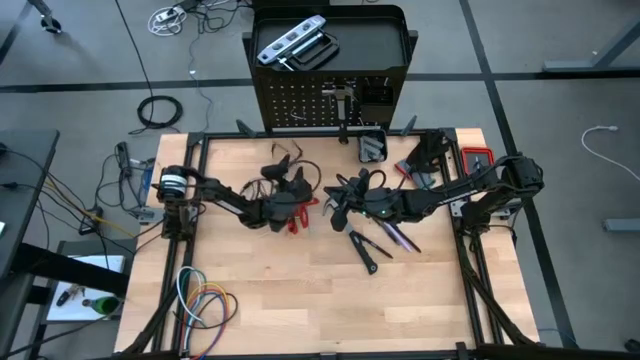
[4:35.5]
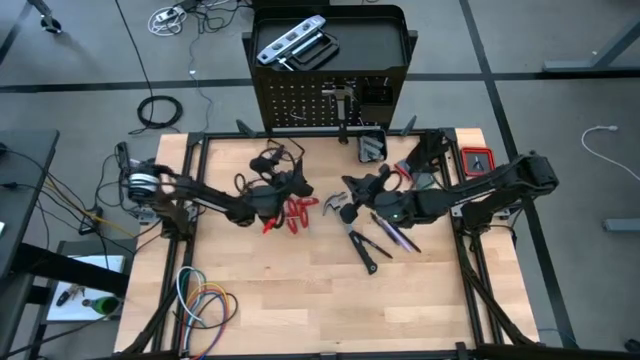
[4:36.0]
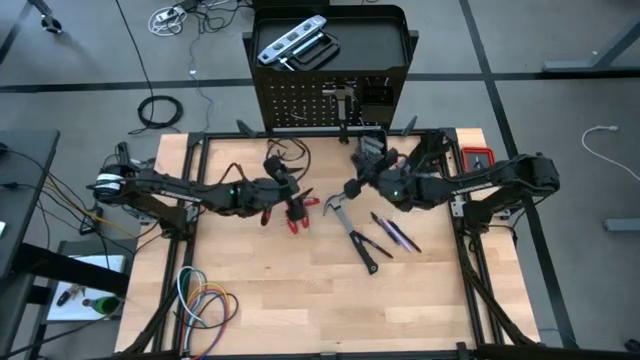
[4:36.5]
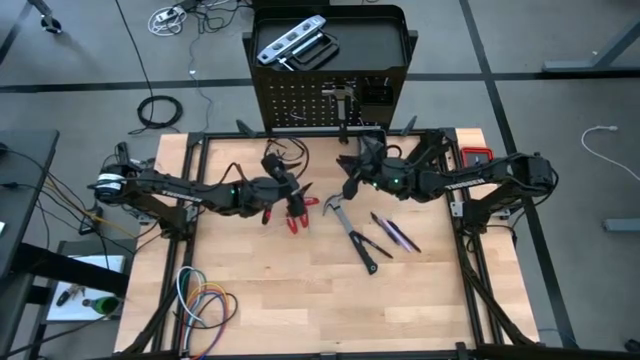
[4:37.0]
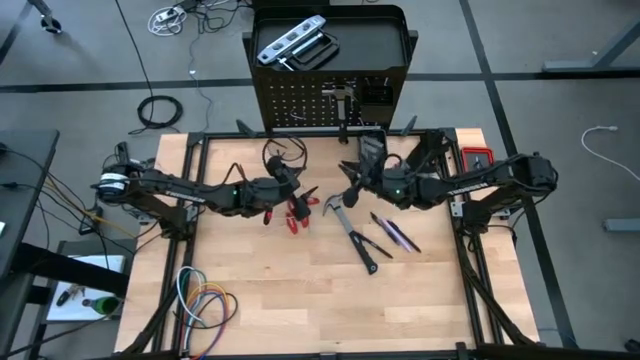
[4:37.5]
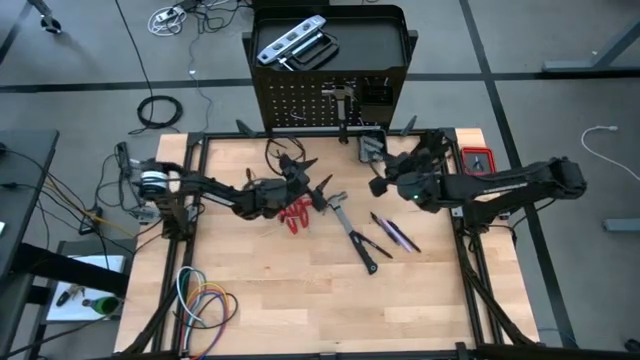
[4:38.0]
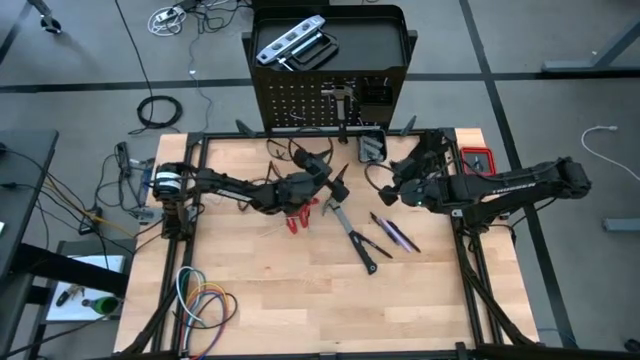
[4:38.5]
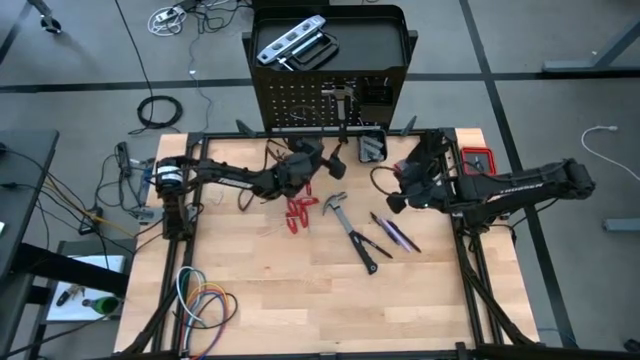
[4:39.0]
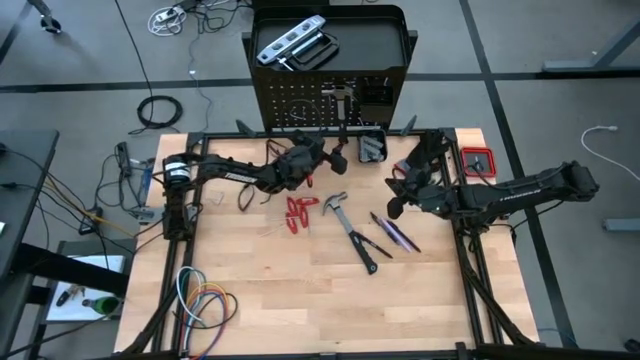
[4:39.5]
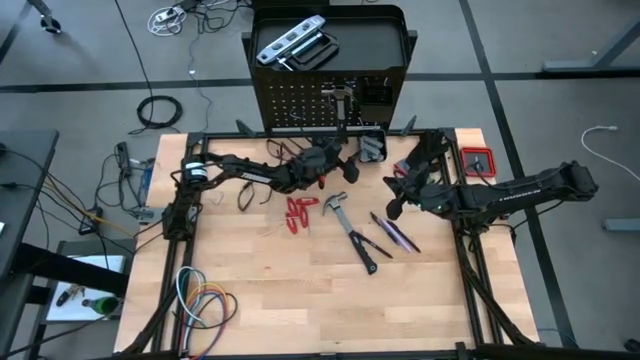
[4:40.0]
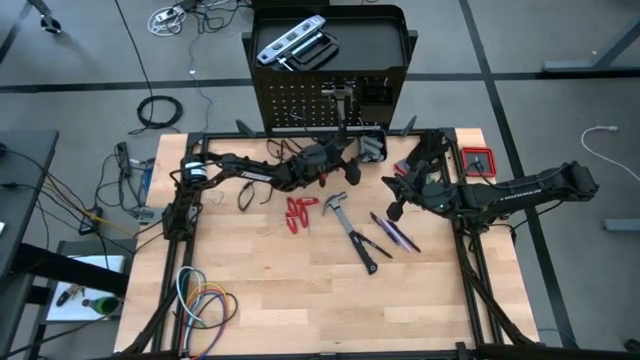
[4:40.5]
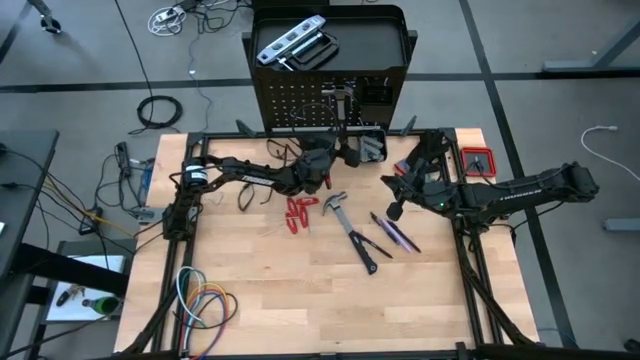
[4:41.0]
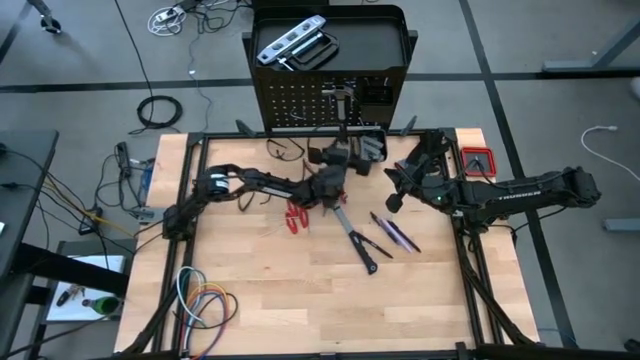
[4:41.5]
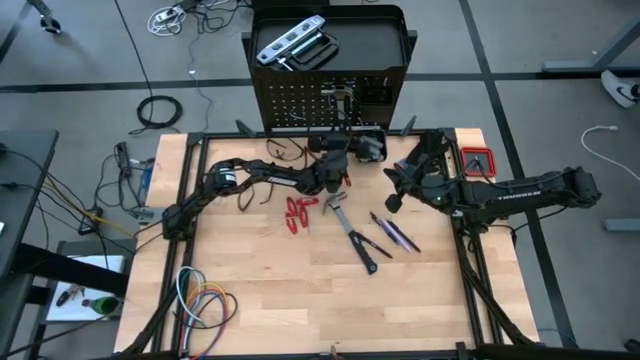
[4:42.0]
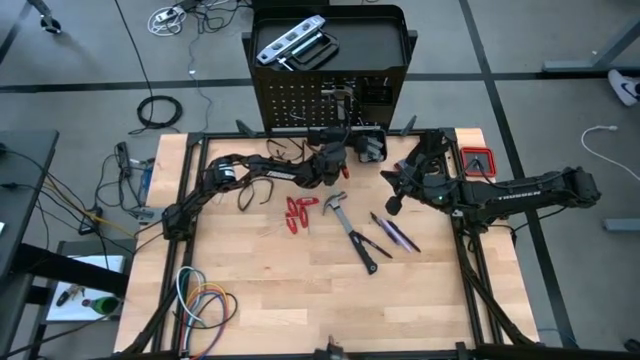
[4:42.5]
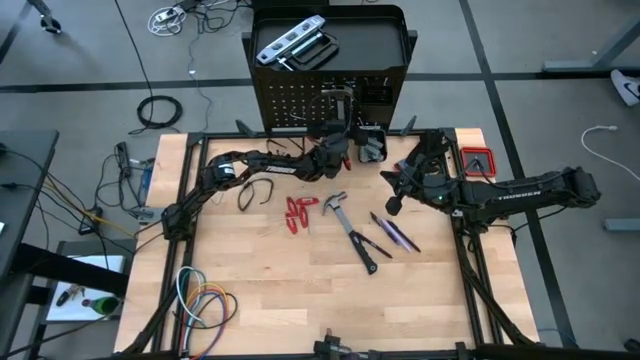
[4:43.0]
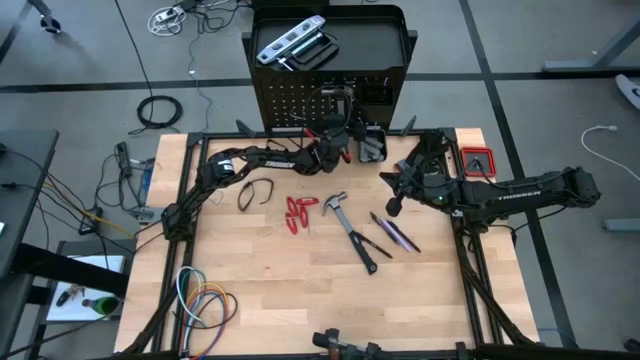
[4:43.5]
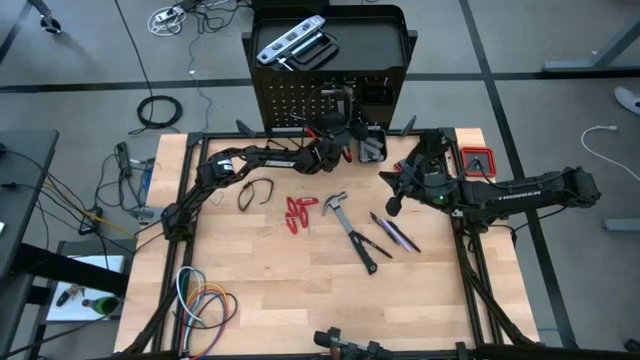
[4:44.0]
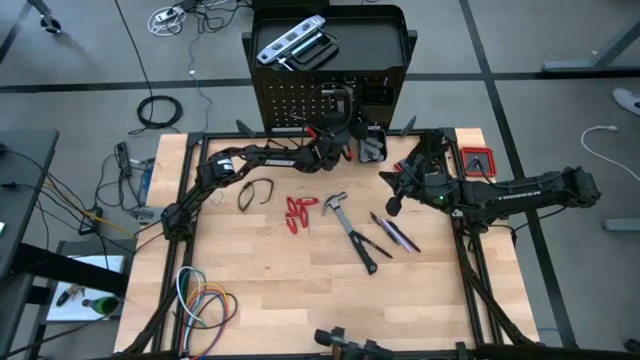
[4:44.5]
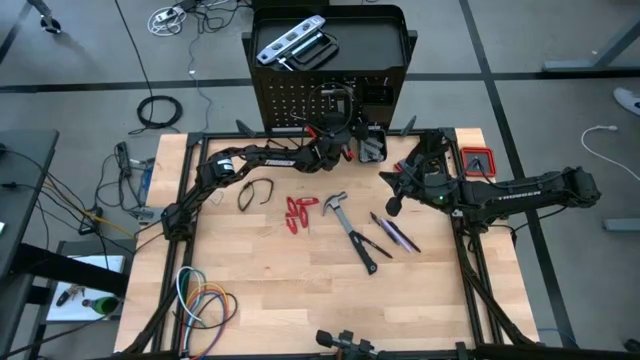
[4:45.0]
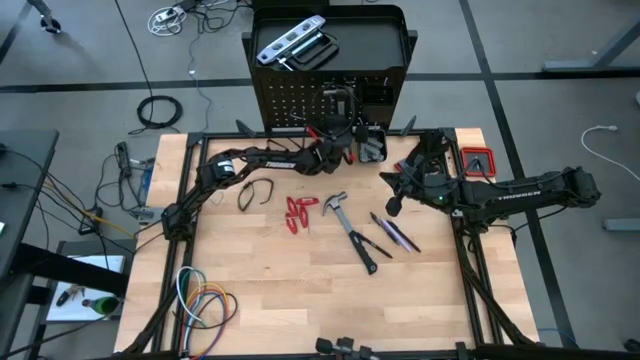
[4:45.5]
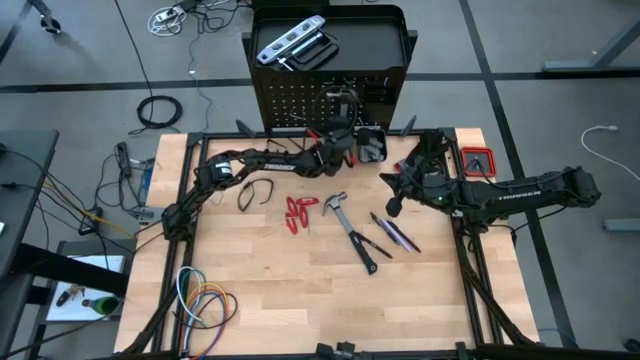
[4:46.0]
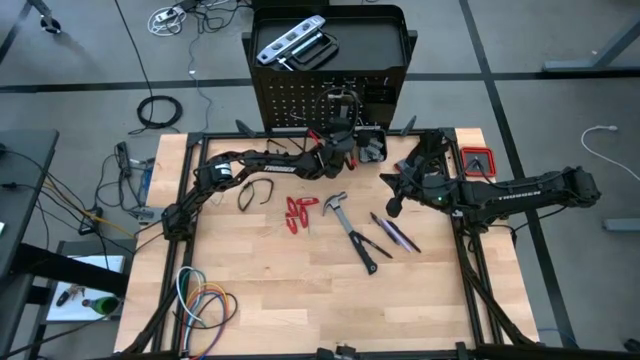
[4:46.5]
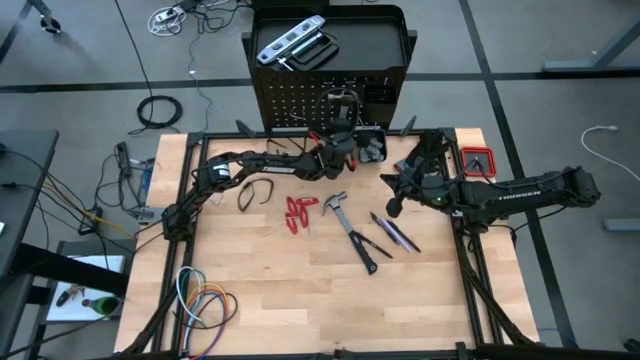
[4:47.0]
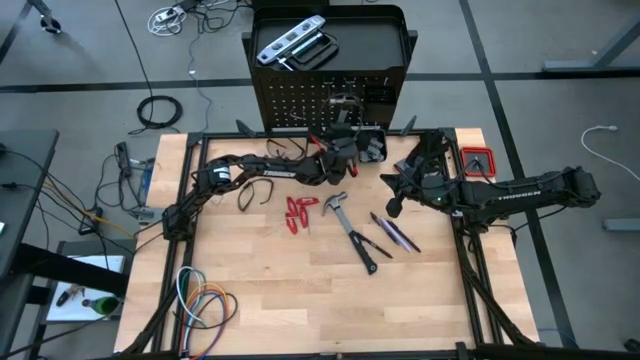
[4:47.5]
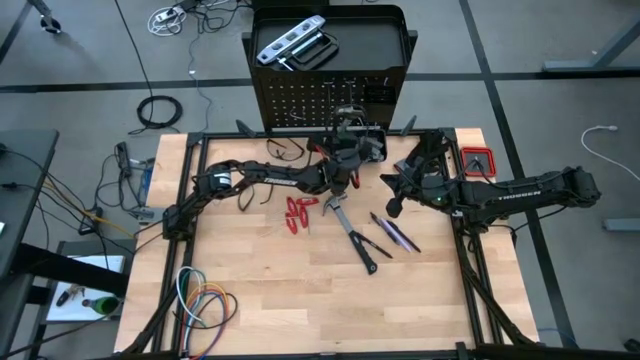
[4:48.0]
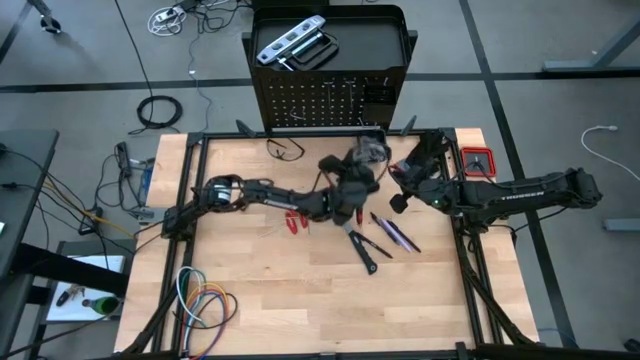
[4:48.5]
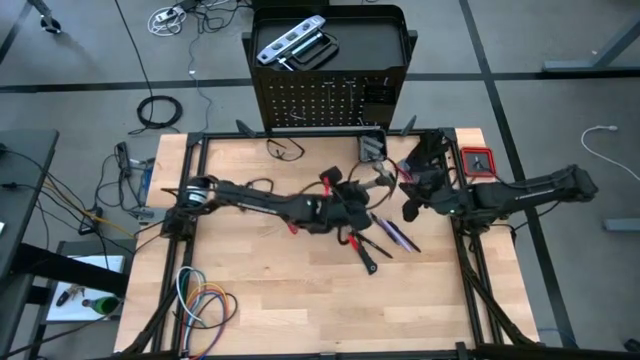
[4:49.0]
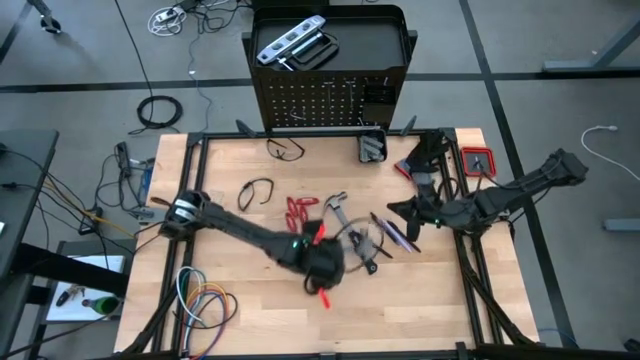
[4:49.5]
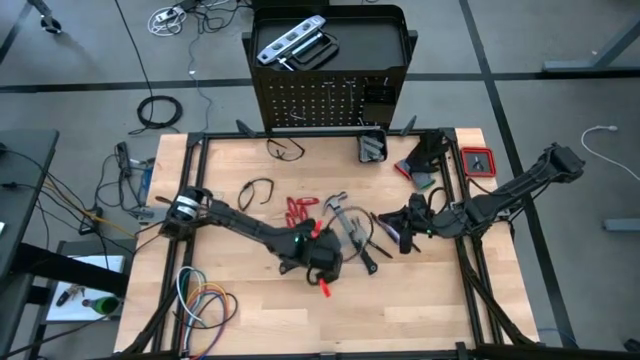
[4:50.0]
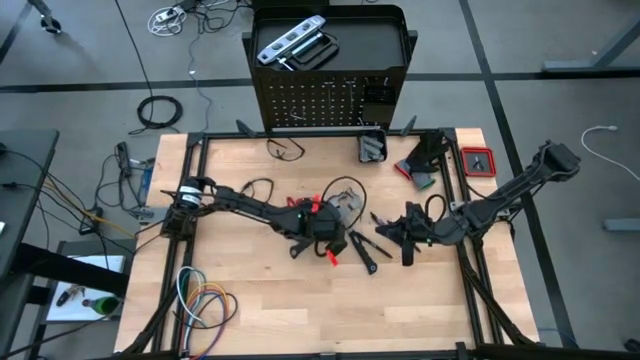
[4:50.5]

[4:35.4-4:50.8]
Task: Hang tools onto peg board
Remove the hammer from the peg board

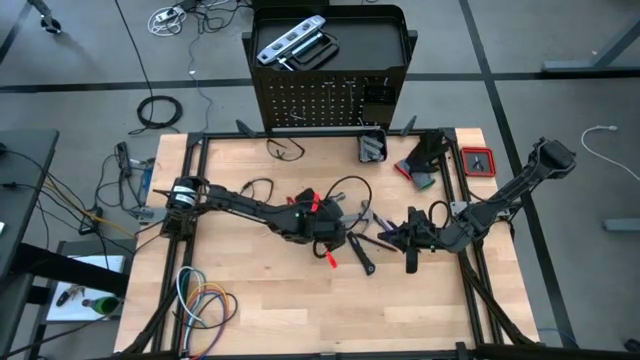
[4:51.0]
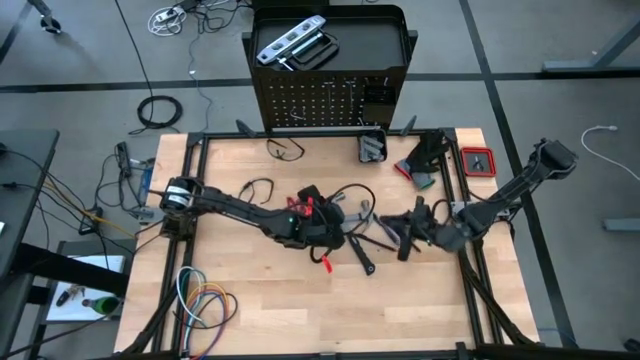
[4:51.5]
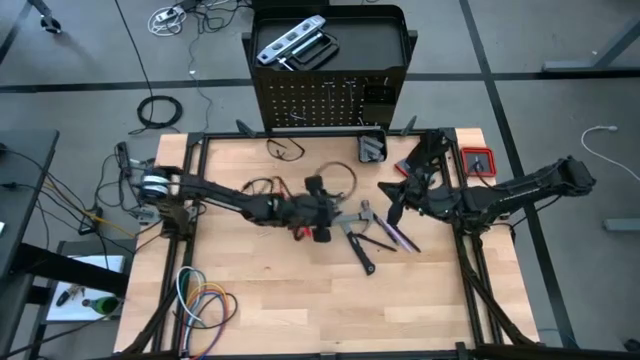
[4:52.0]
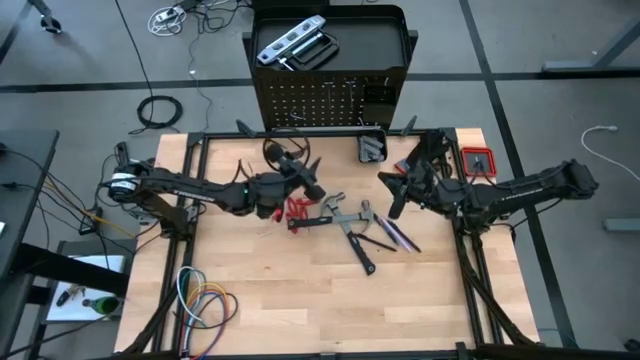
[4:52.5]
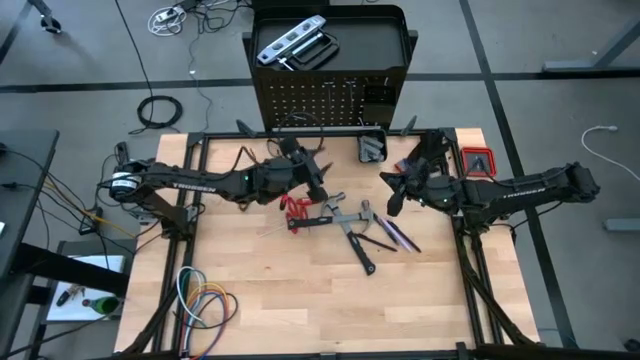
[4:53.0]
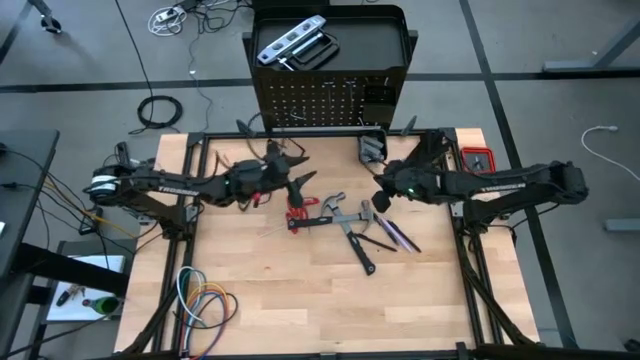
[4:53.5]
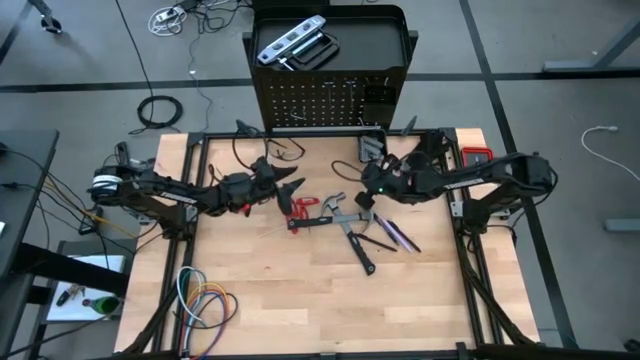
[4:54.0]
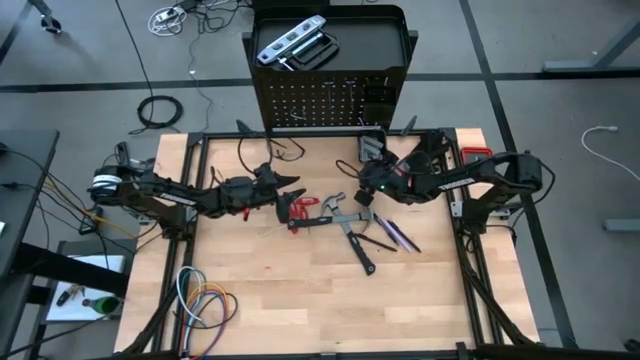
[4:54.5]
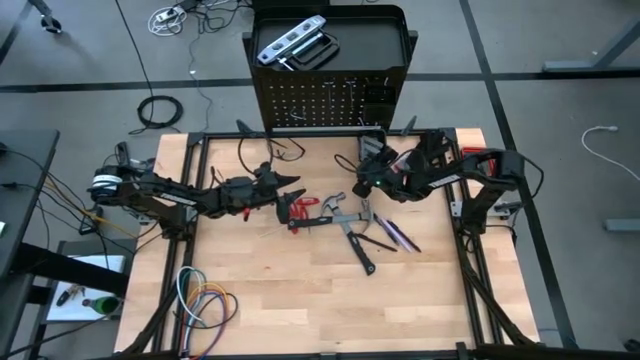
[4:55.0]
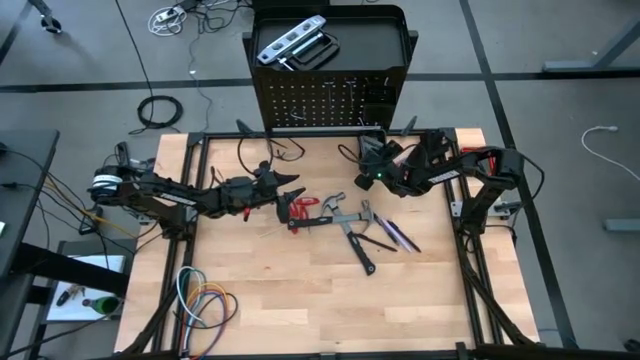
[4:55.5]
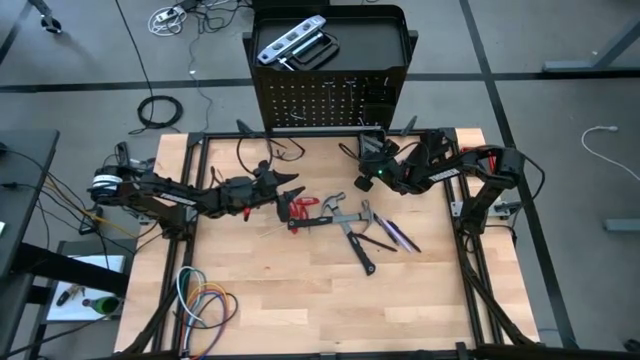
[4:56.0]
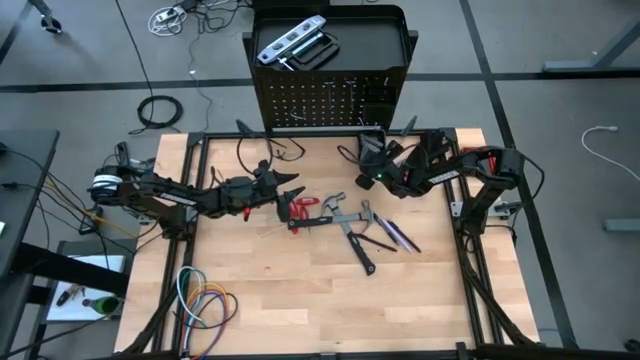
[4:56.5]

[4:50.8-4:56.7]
Remove the terminal block from the bottom basket of the peg board

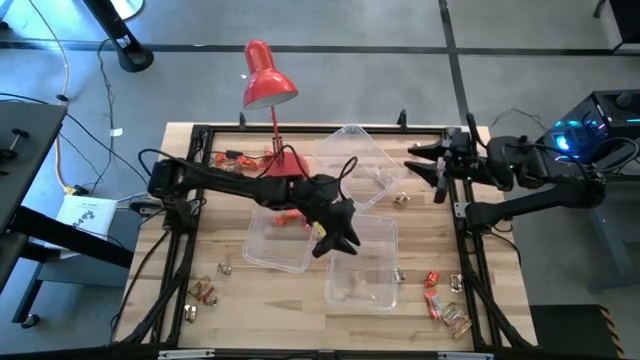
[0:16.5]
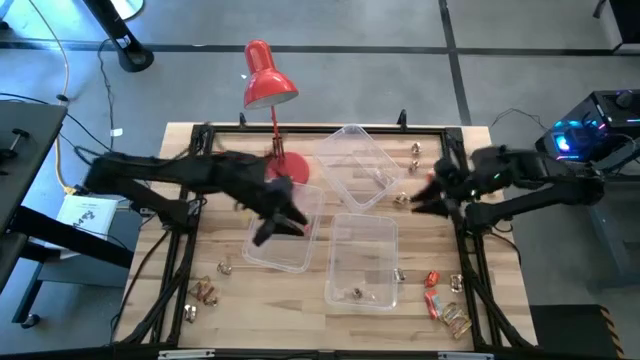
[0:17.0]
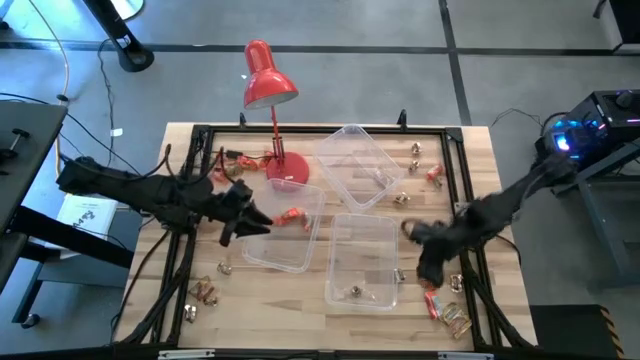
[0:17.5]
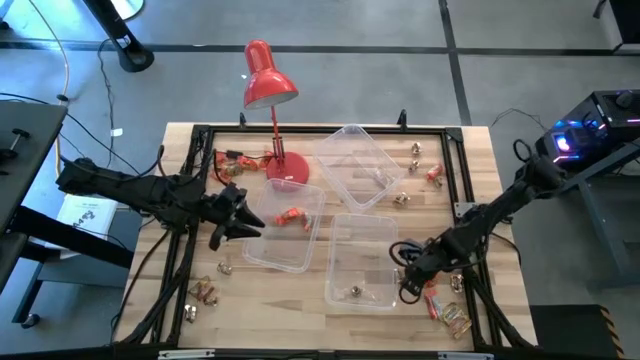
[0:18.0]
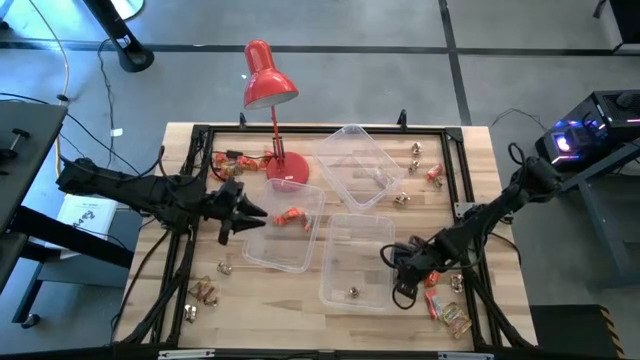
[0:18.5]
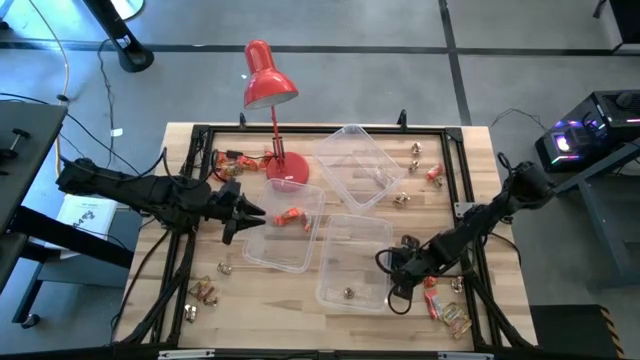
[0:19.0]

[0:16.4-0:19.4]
Task: Sort candy
Put the brown candy into the bottom right transparent bin
